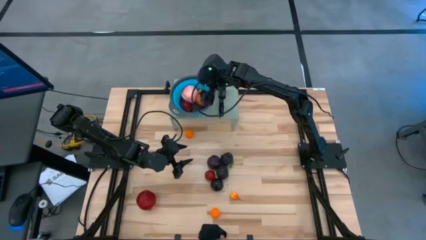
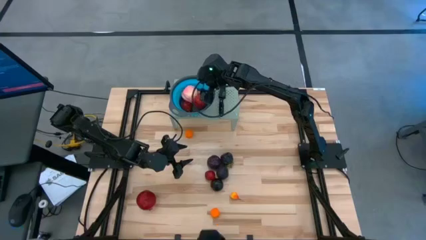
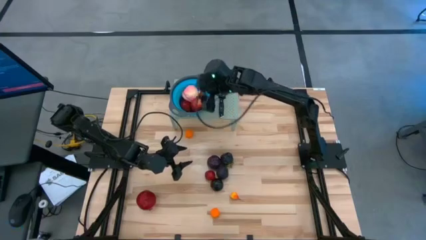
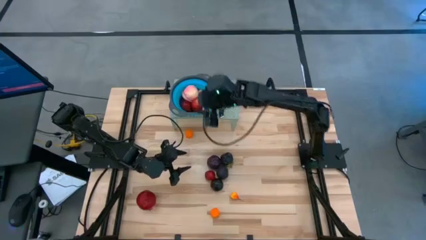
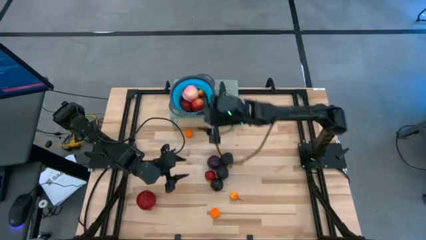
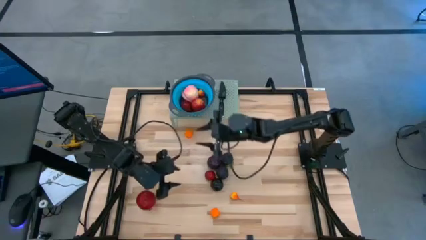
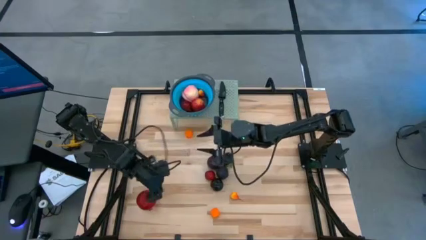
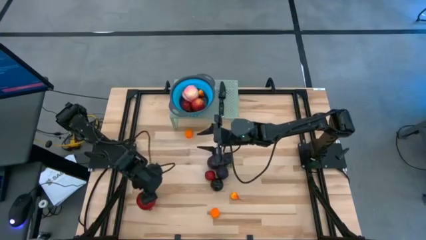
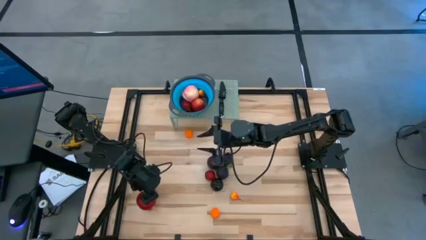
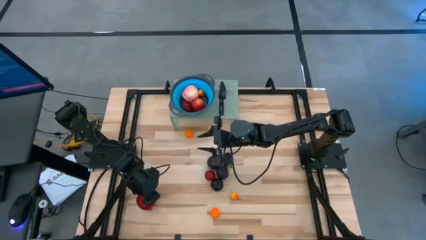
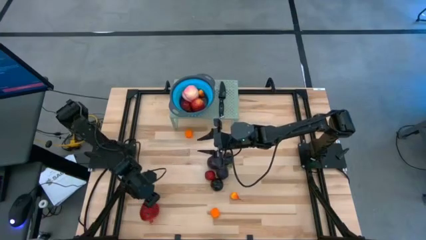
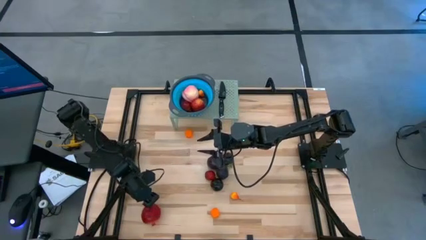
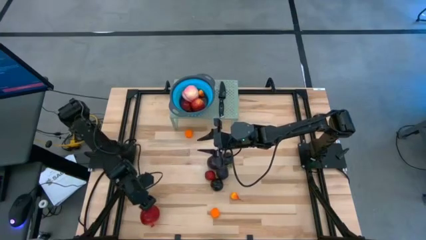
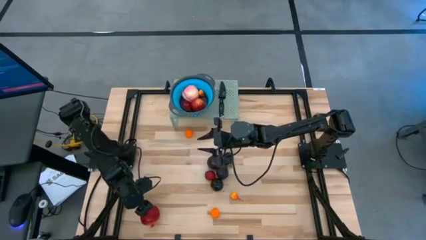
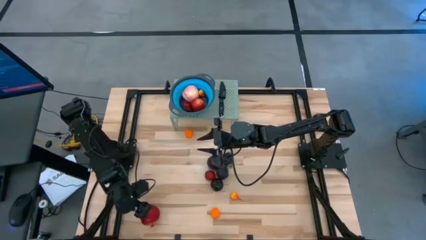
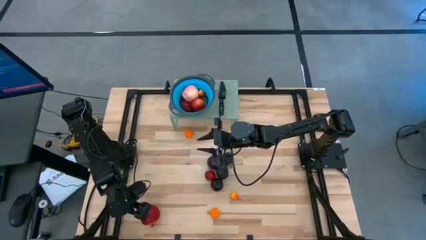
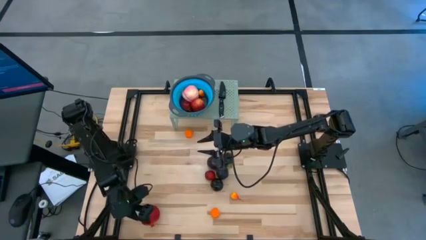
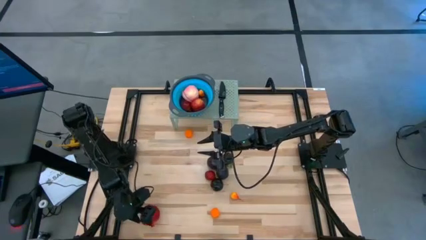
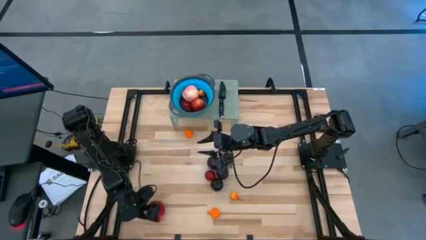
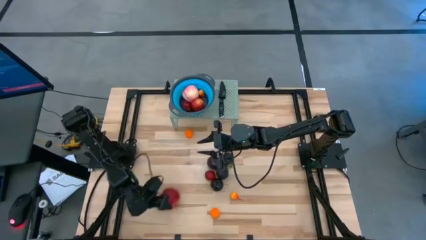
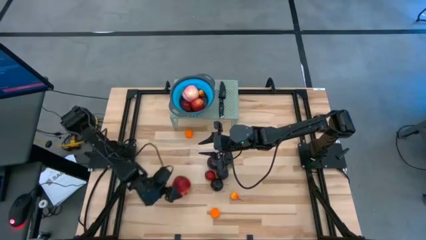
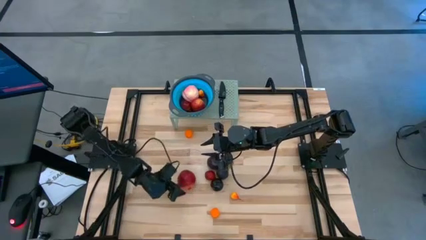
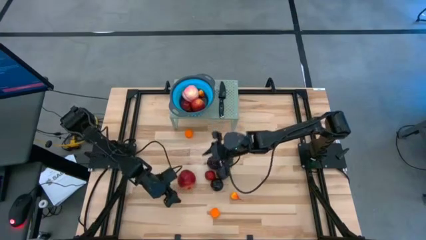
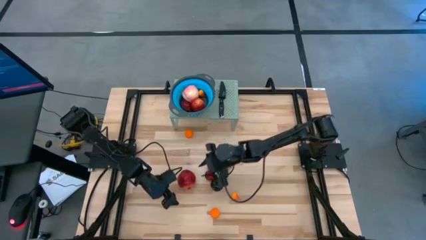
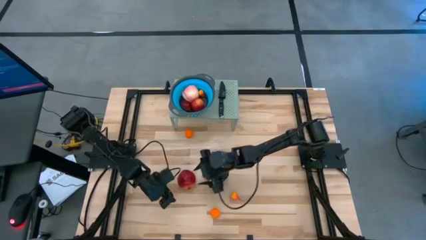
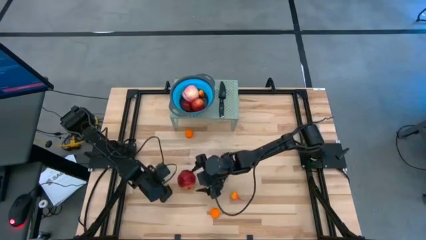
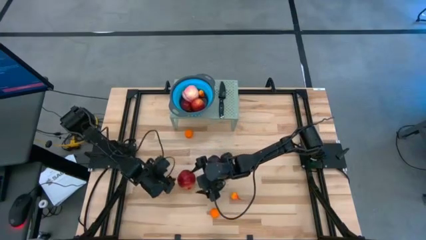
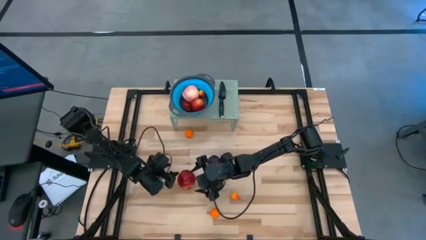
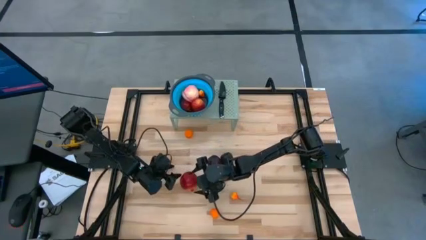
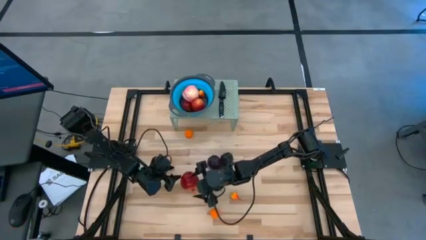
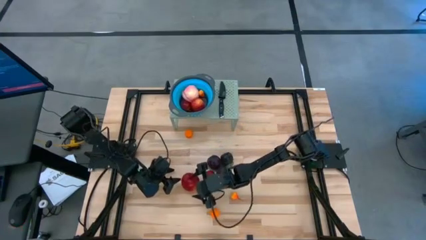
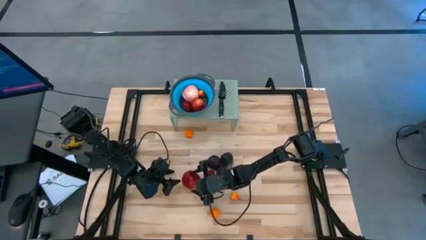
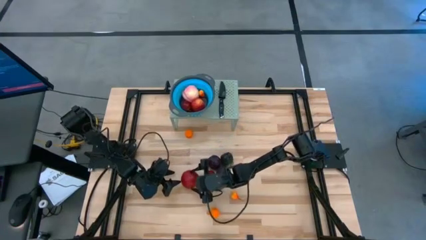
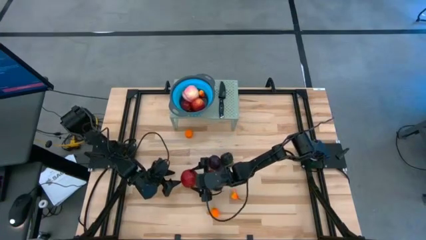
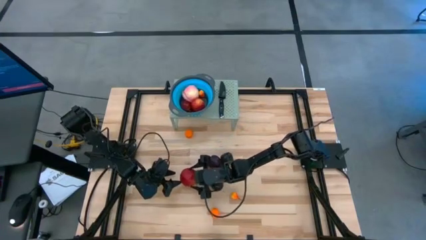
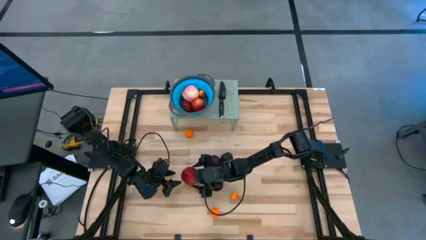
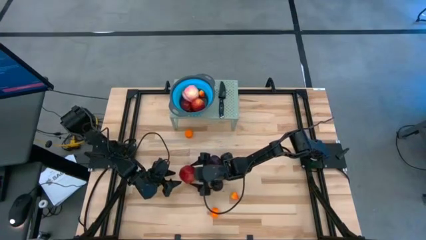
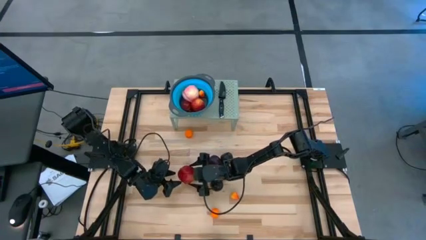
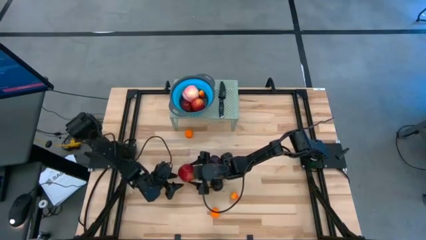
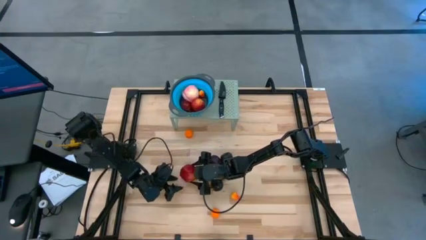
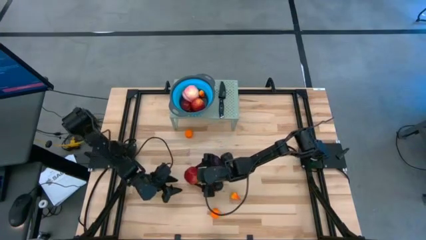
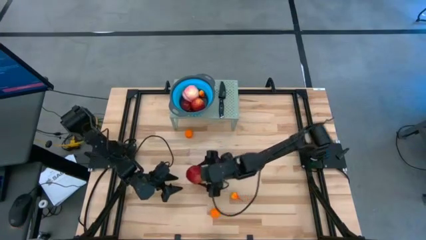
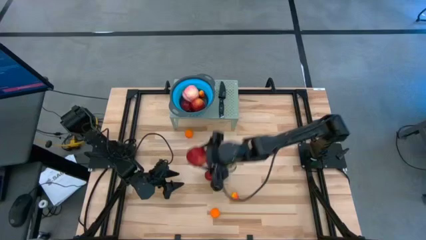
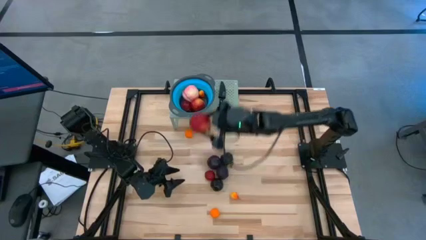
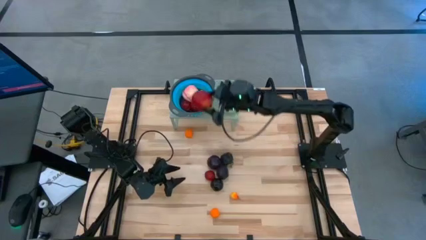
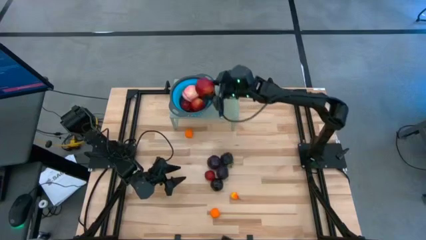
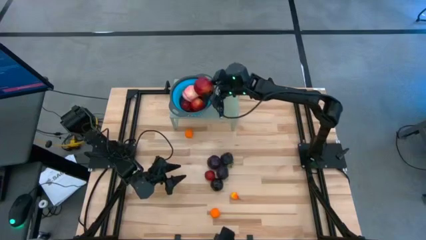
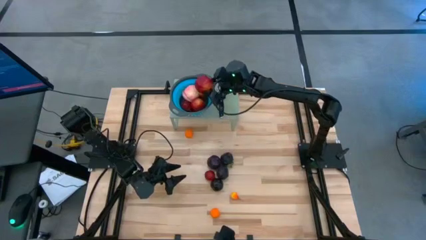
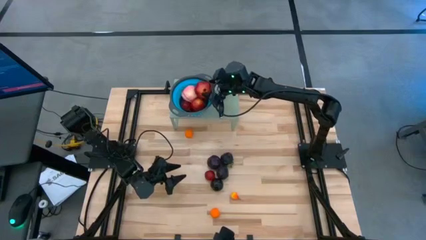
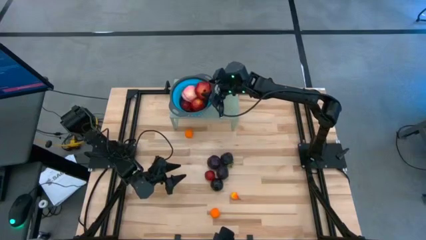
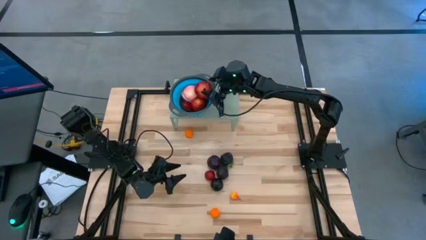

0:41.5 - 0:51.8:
Task: Pick & Place Fruit
Put the red pomegranate into the blue strainer bowl

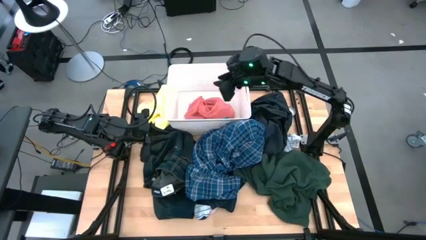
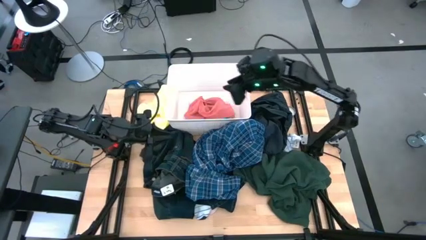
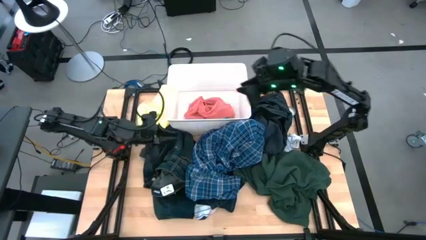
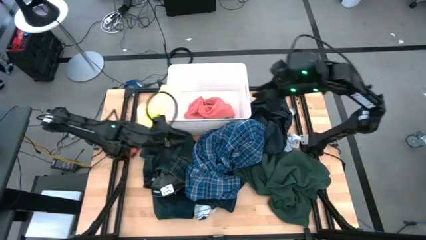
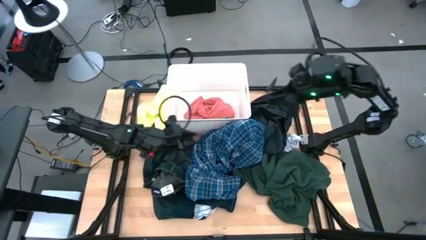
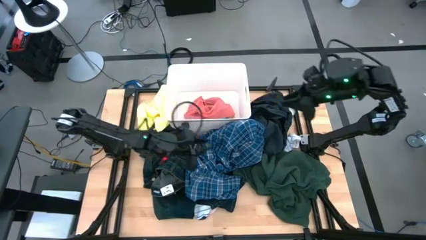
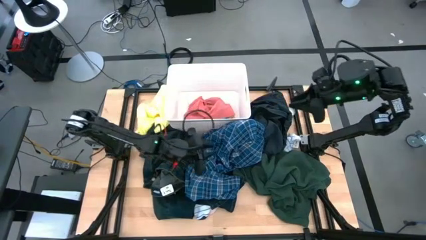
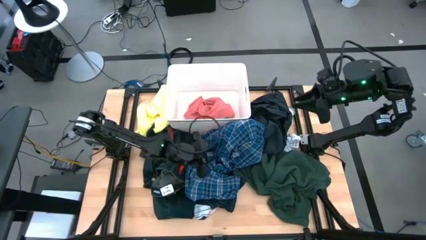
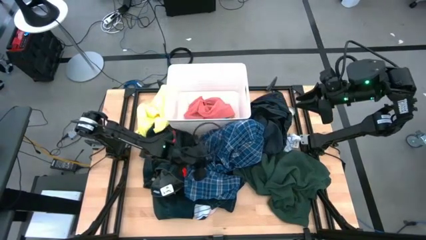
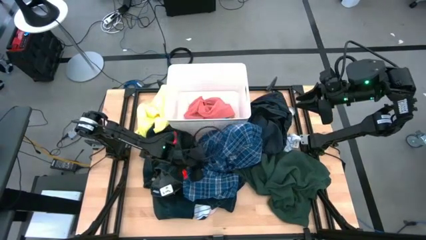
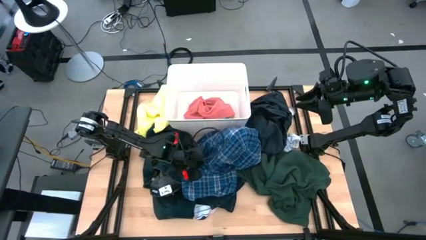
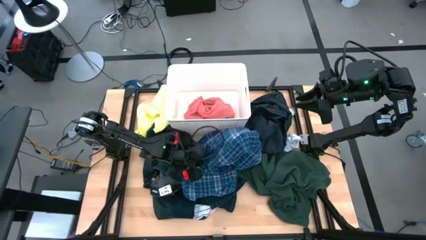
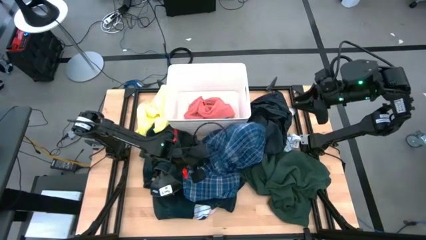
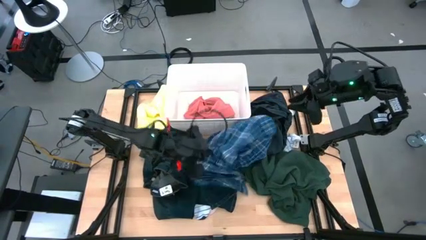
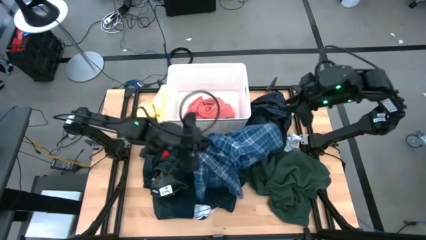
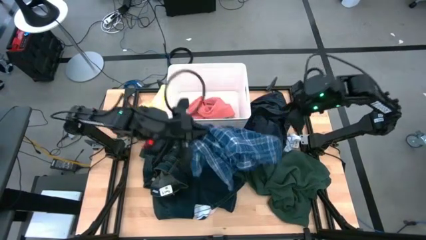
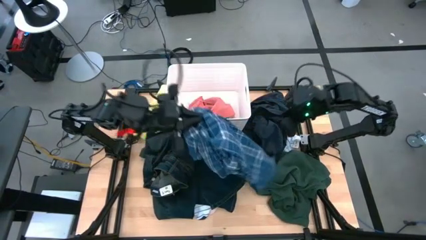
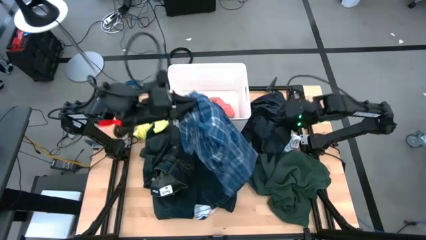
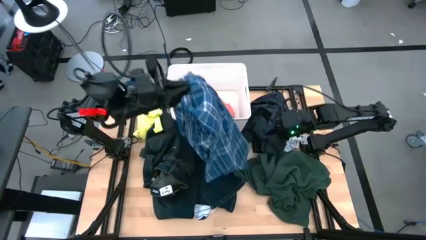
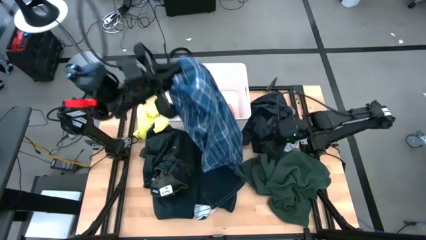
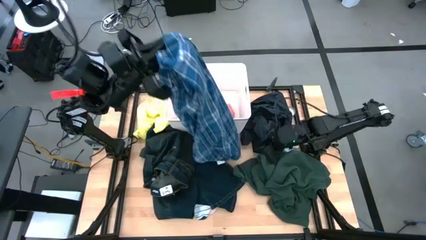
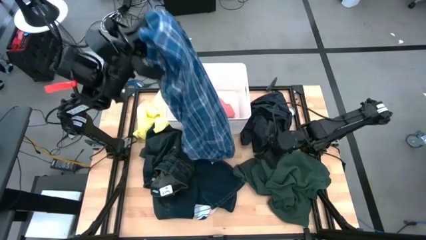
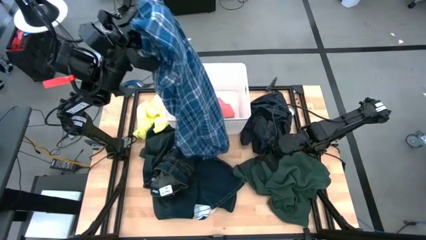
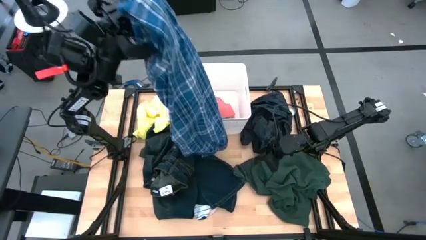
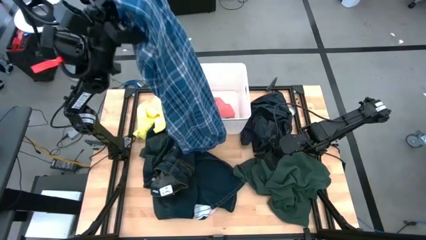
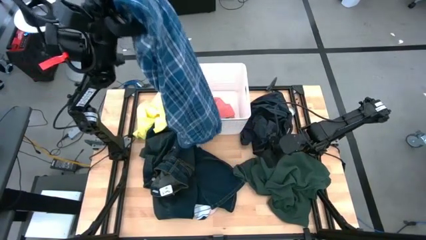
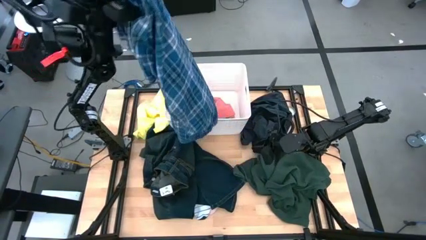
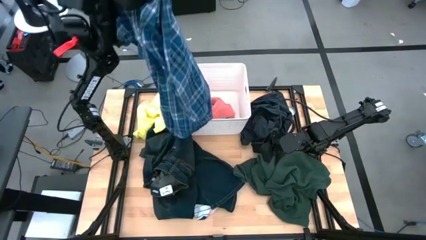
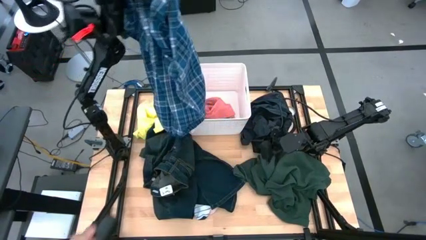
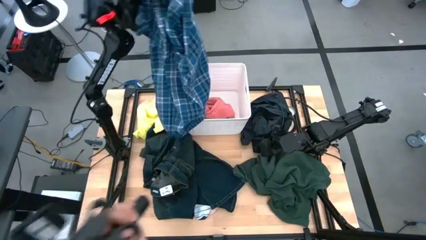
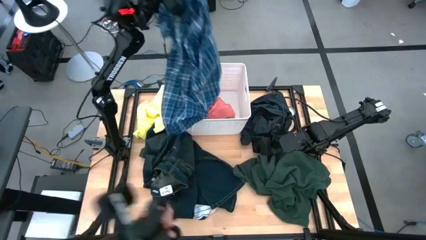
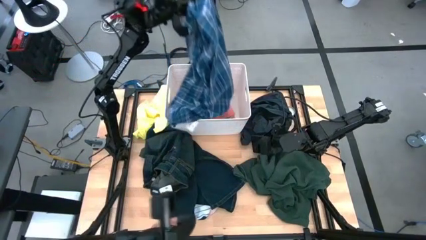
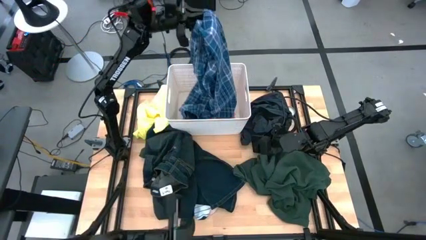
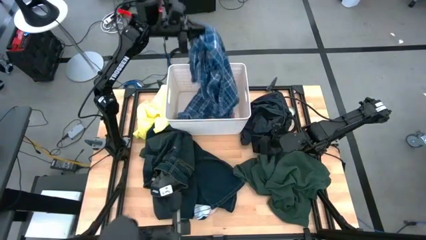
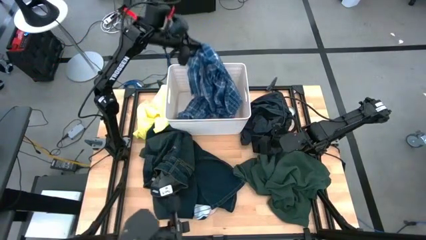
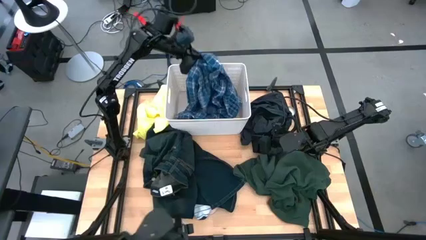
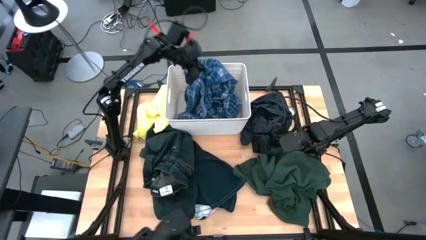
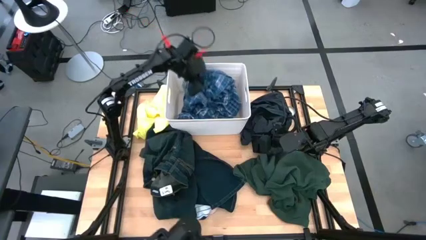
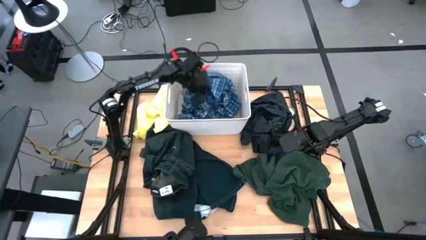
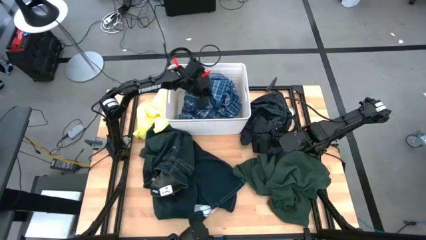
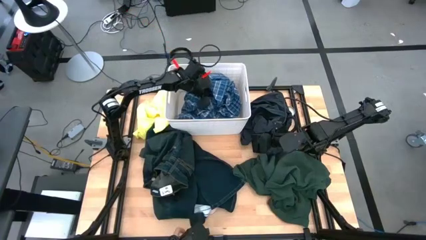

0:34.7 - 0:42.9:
Task: Sort clothes
Put the patterned shirt into the laundry organizer
